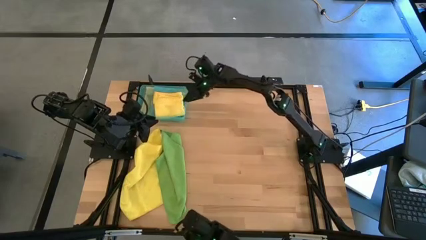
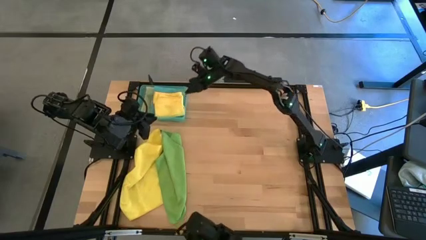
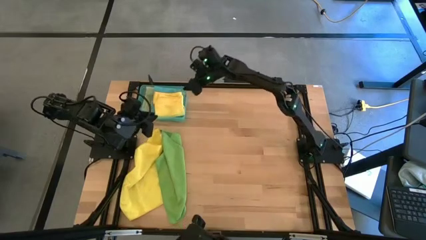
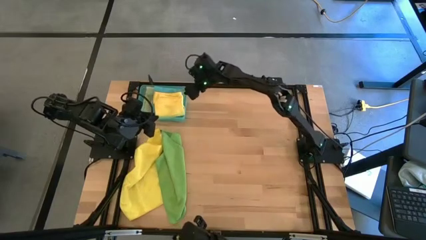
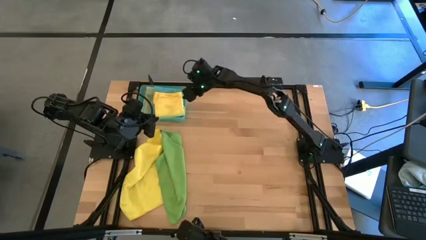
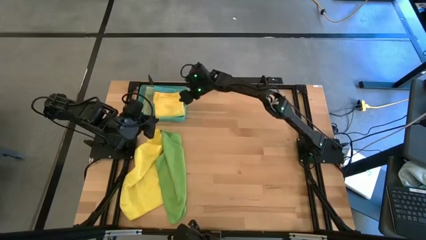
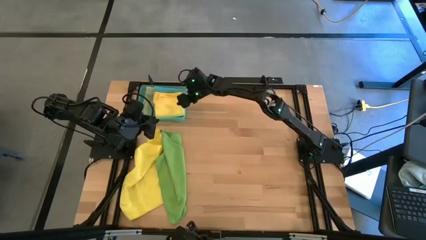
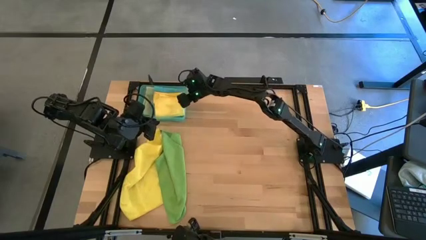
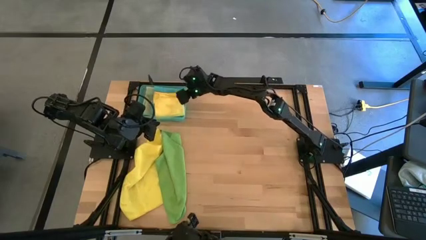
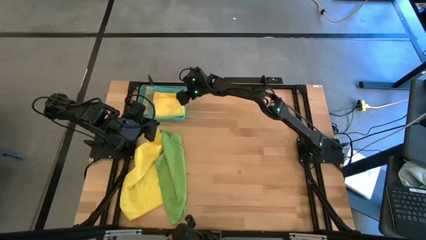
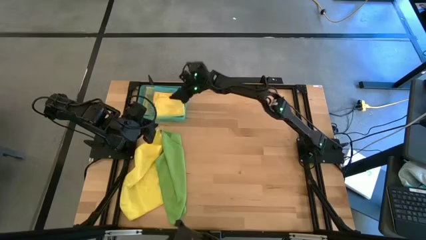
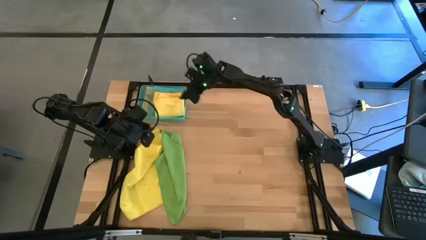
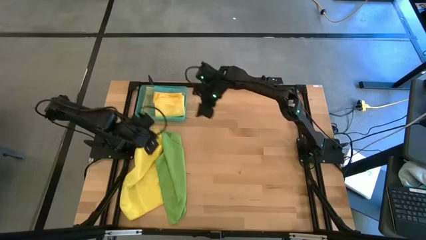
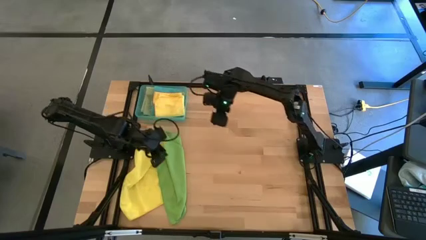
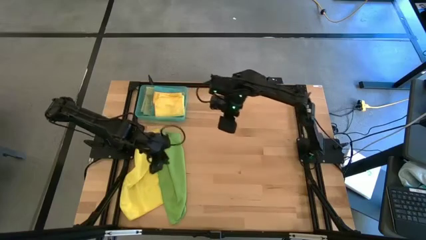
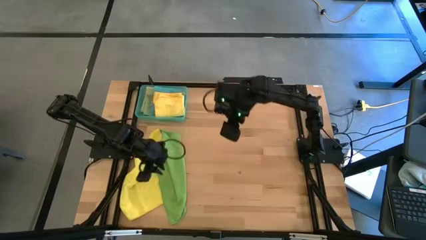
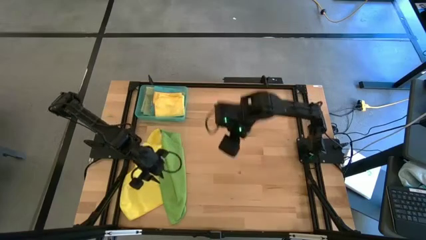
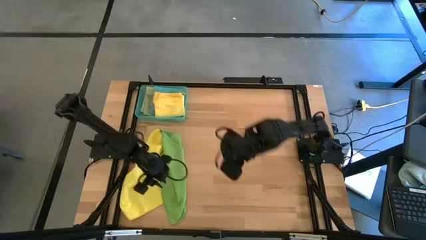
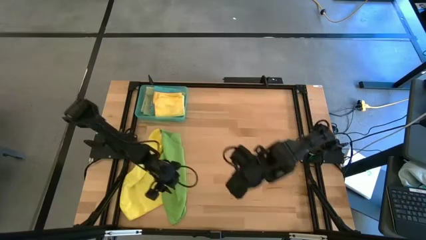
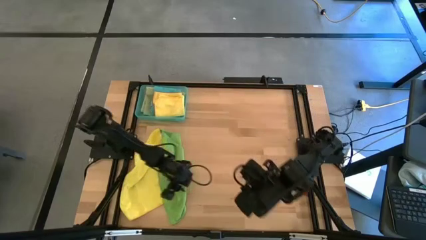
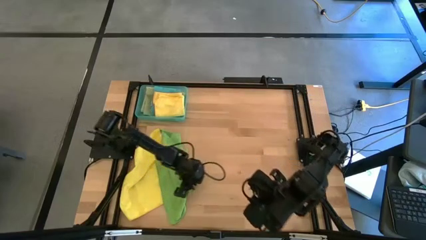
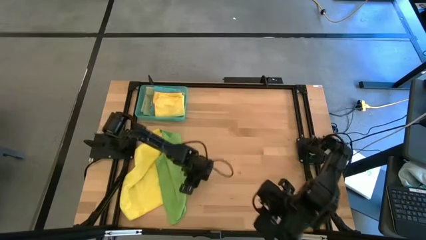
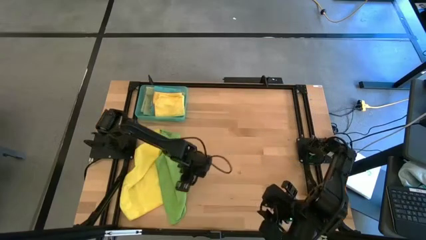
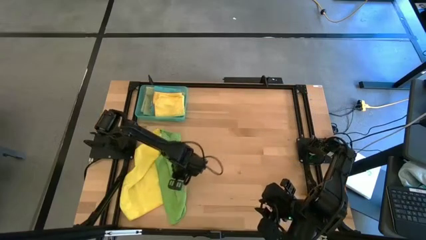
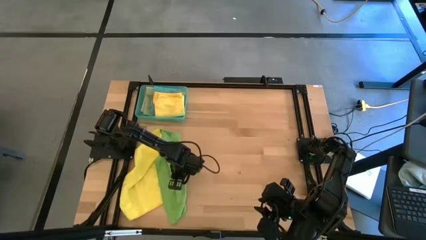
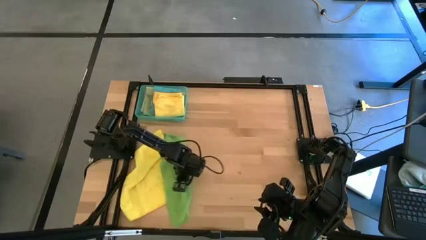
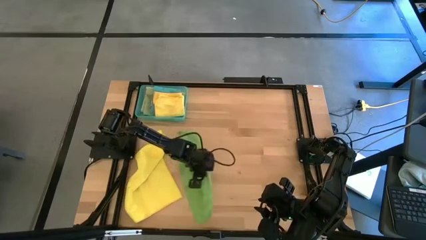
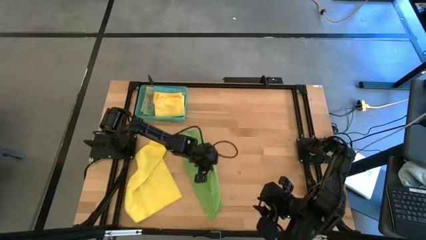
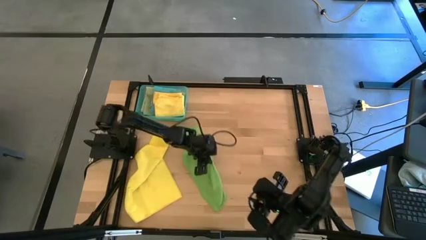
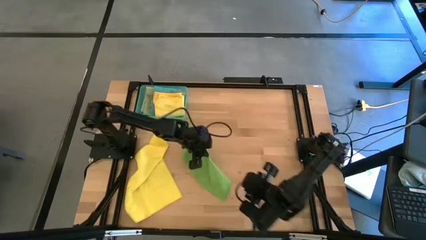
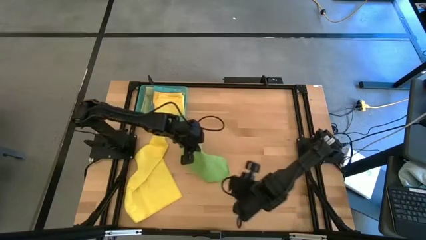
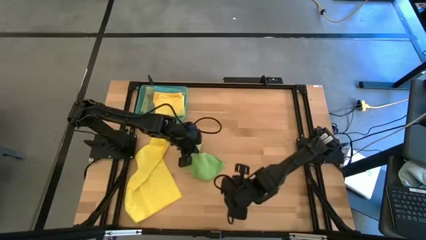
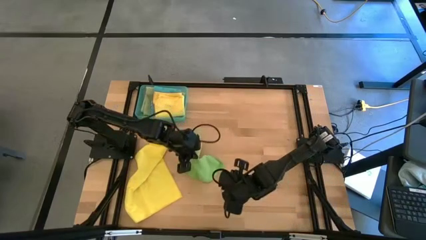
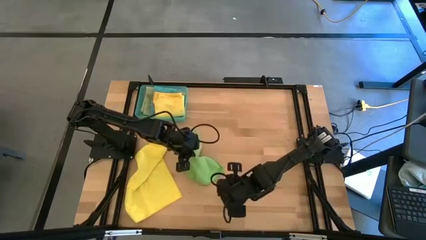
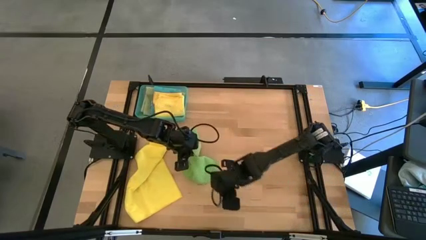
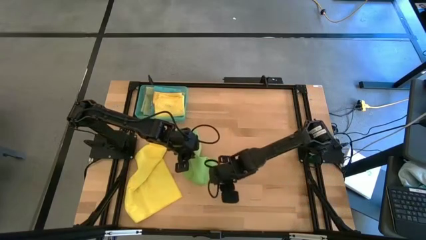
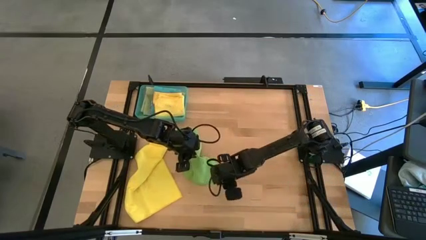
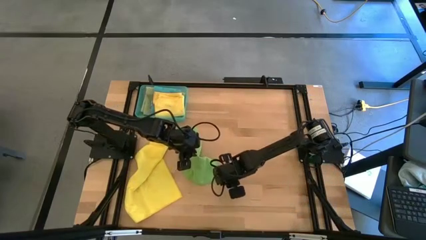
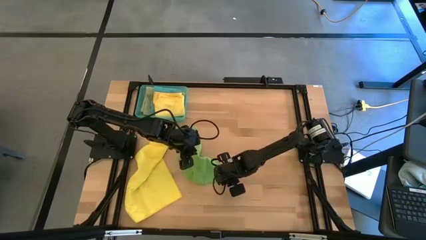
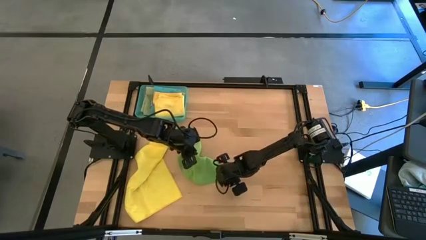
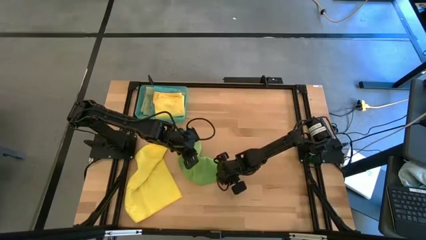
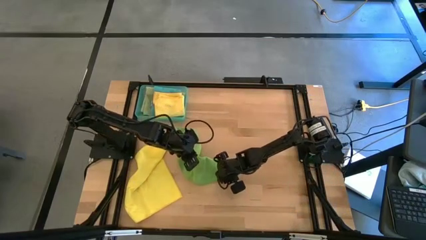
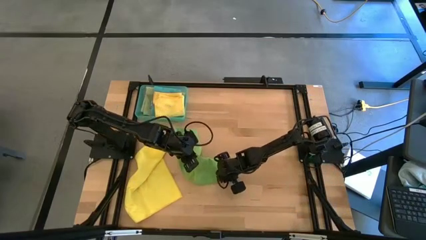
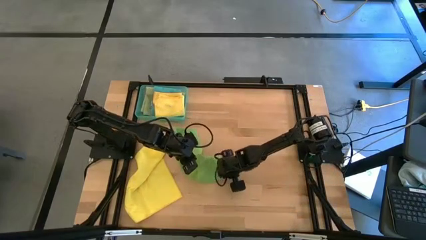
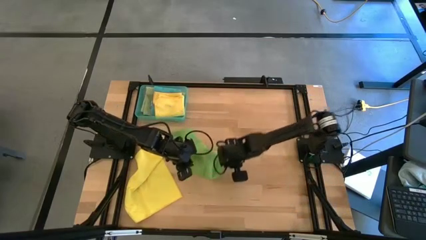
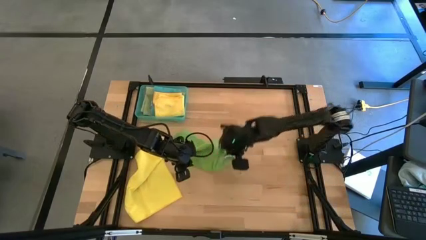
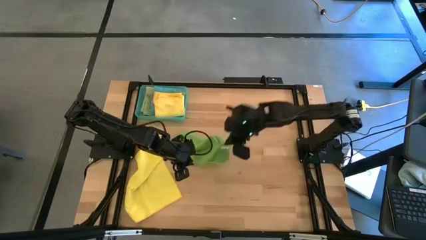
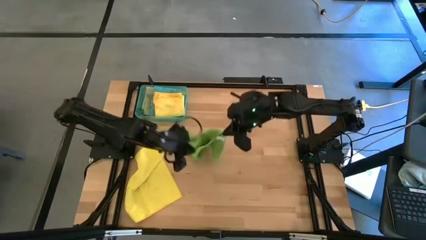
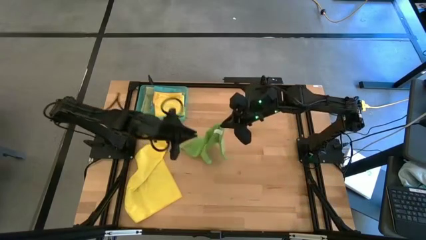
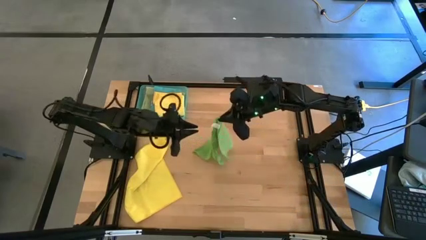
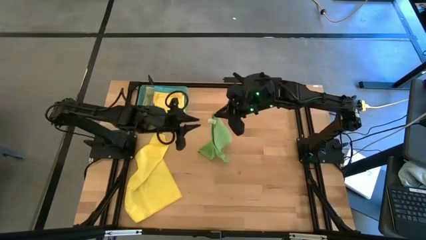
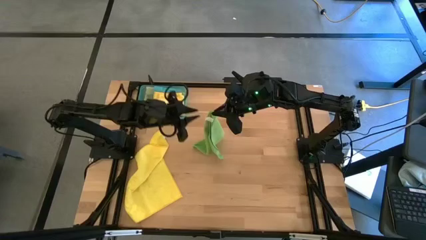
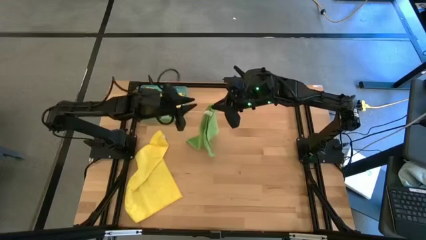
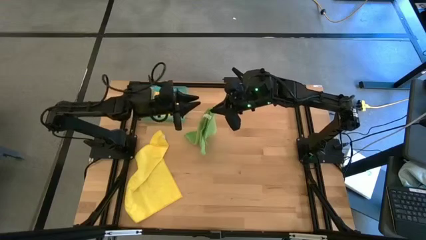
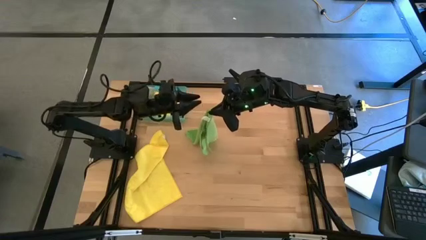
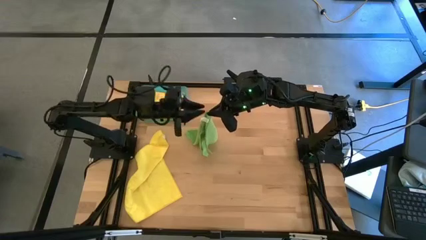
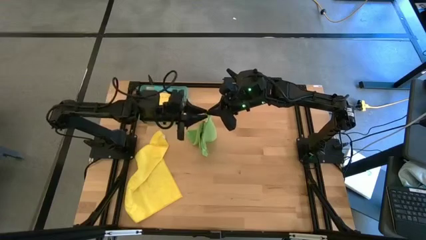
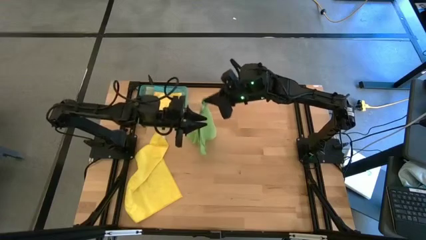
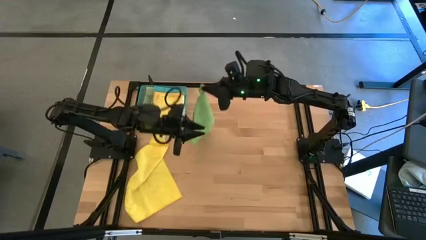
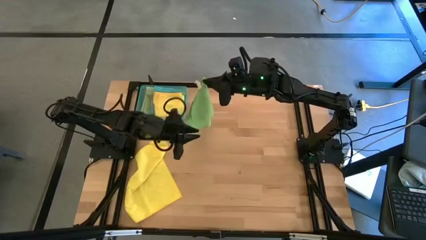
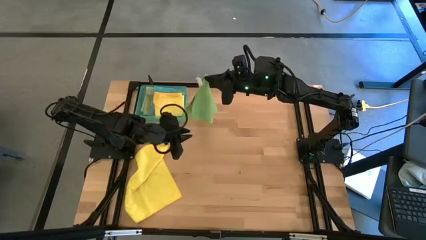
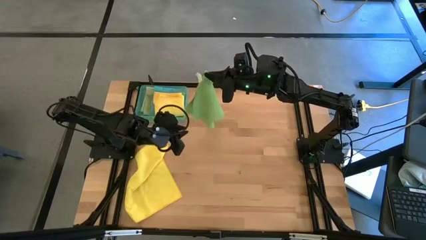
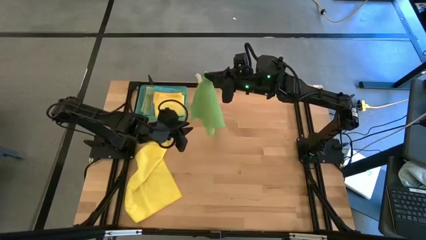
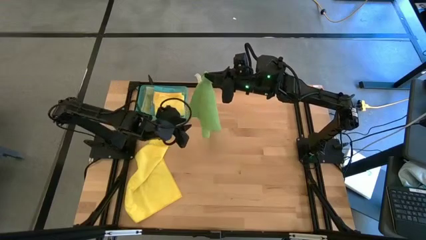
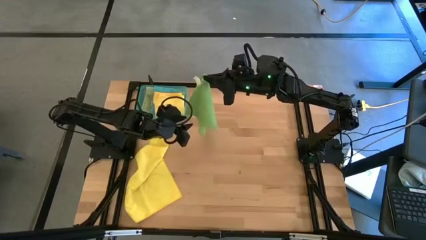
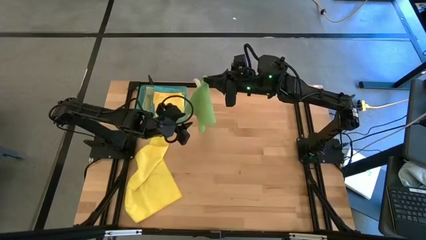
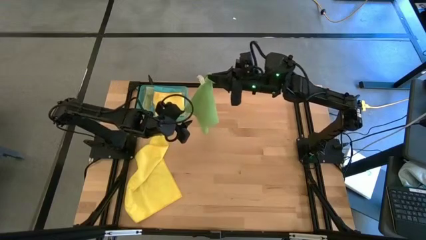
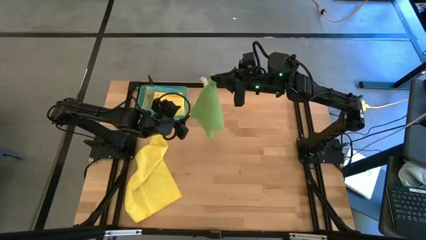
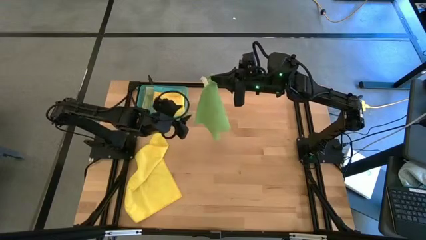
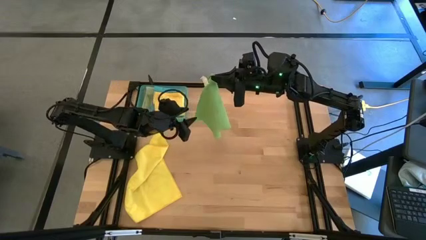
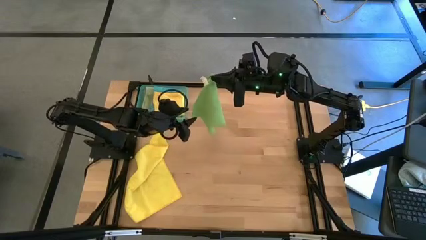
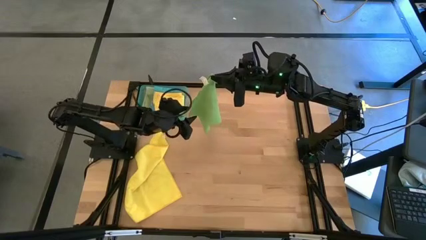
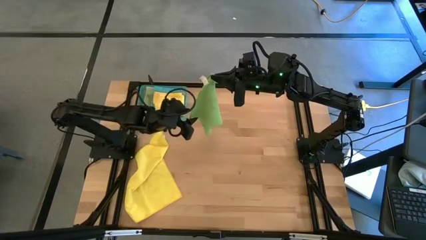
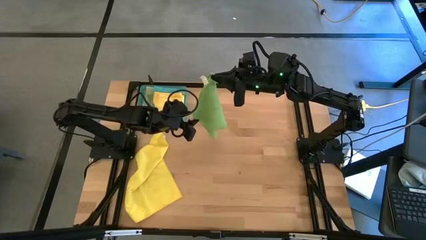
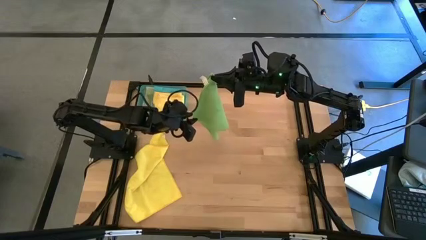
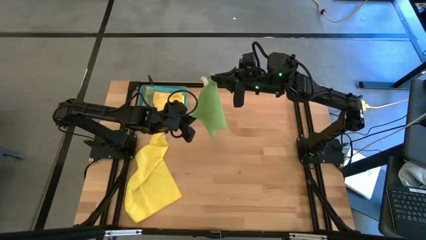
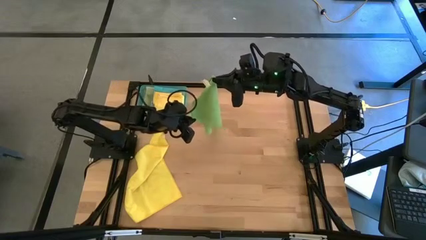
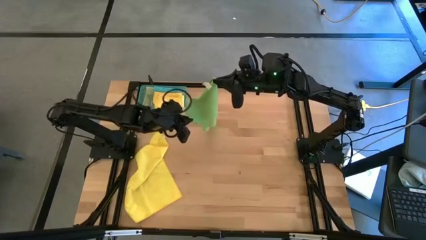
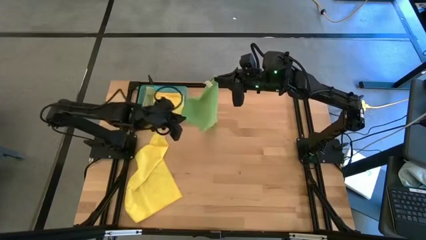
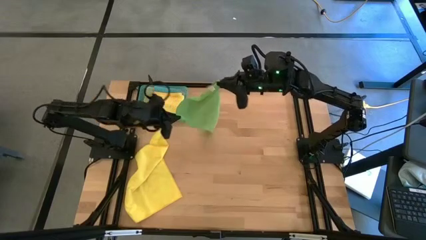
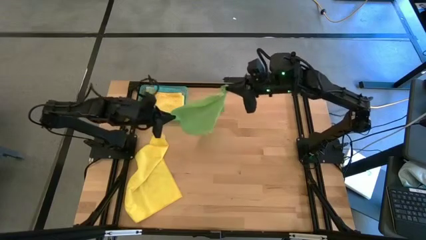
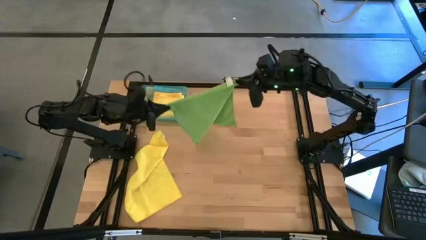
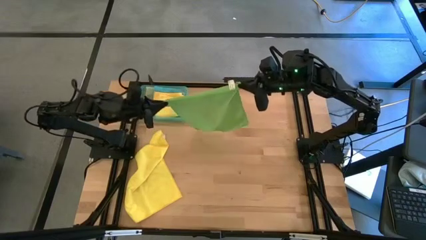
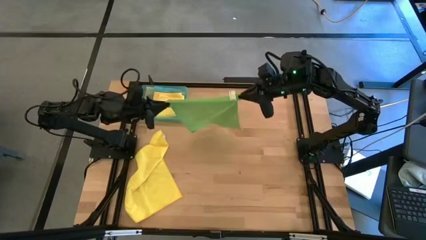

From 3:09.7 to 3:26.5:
Task: Fold microfiber towels
Fold the green microfiber cloth

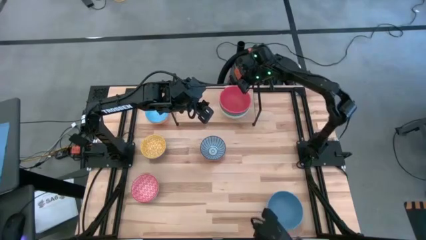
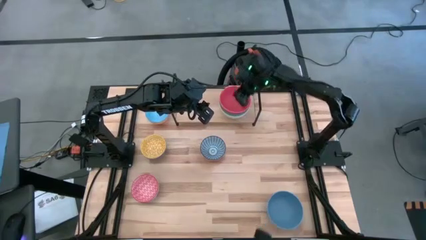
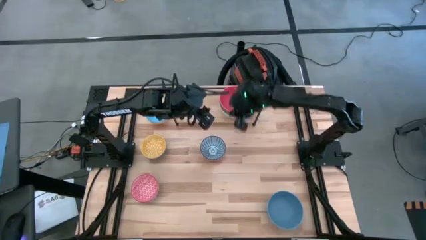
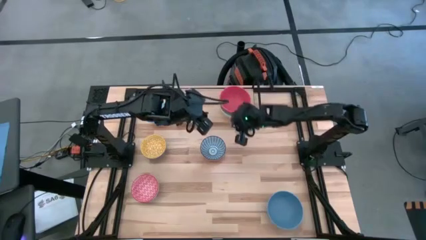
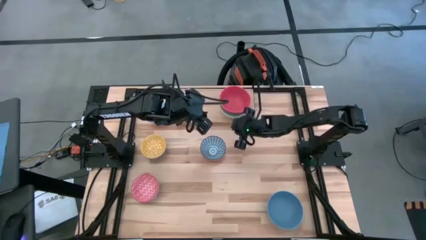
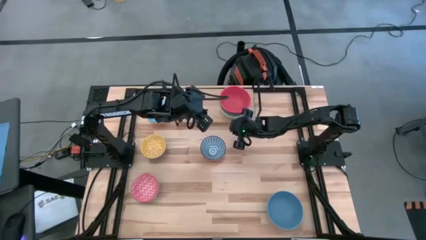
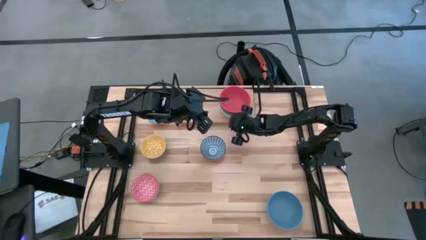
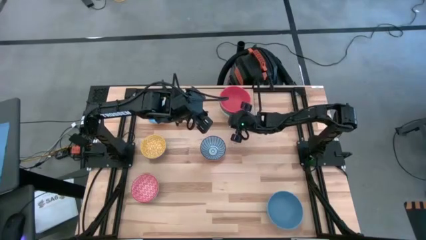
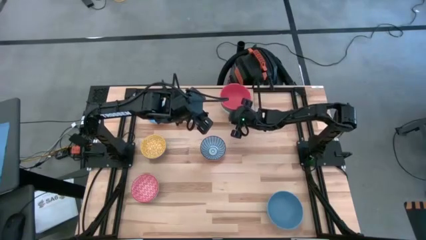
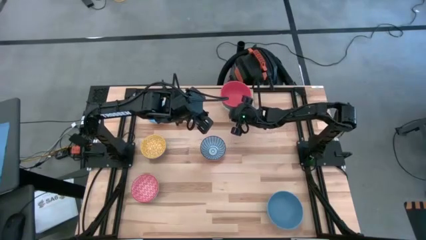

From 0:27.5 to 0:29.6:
Task: Place and stack bowls onto a shelf
Adjust the bowls on the shelf
